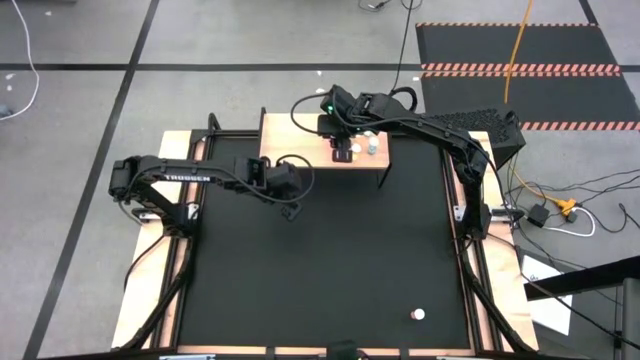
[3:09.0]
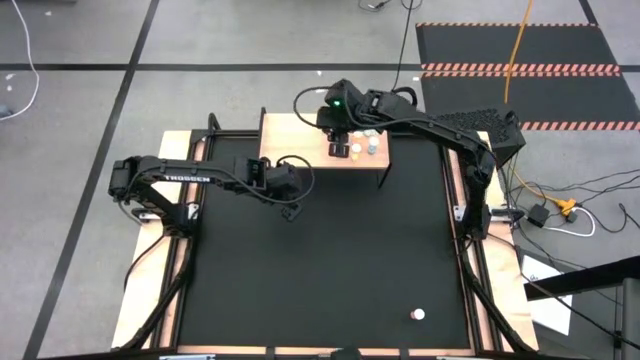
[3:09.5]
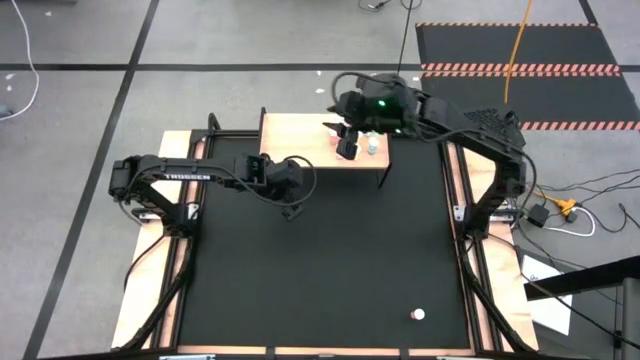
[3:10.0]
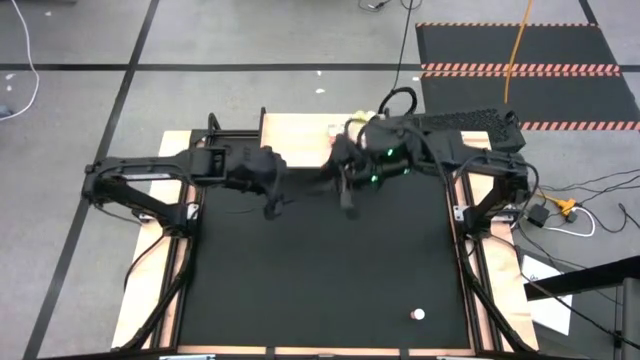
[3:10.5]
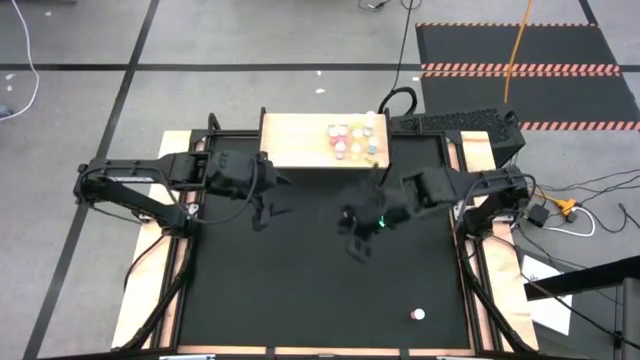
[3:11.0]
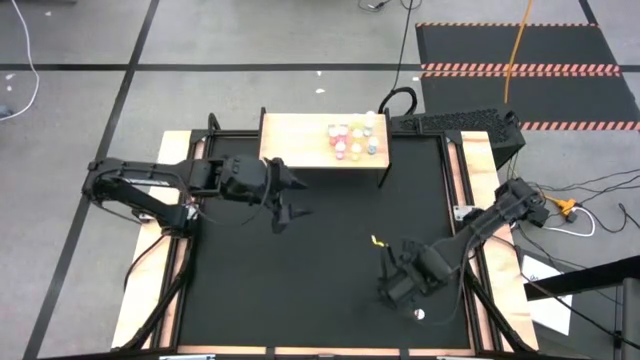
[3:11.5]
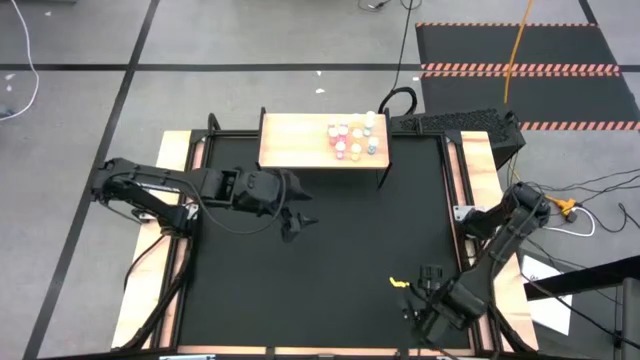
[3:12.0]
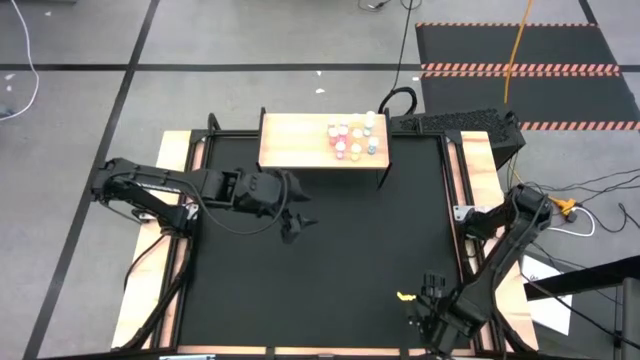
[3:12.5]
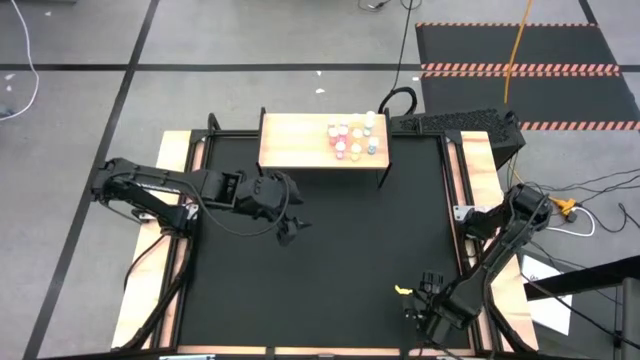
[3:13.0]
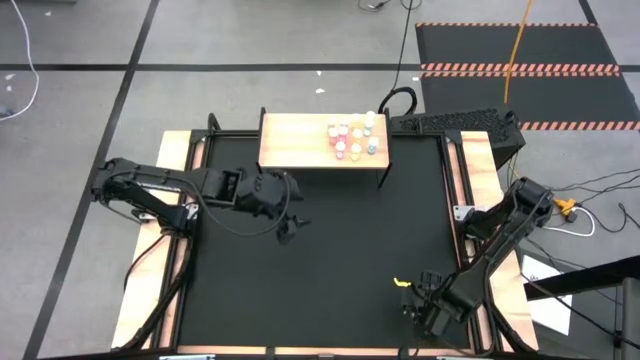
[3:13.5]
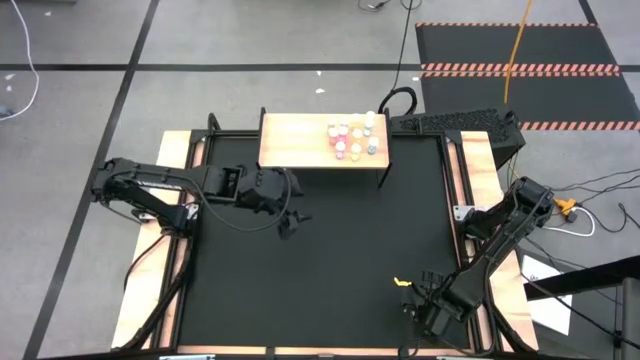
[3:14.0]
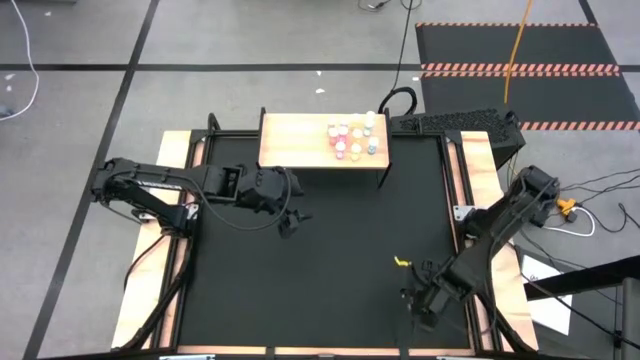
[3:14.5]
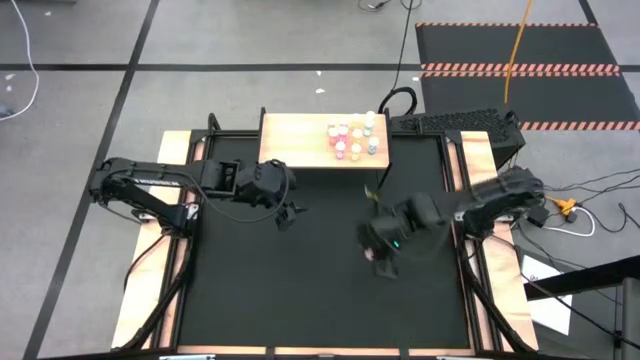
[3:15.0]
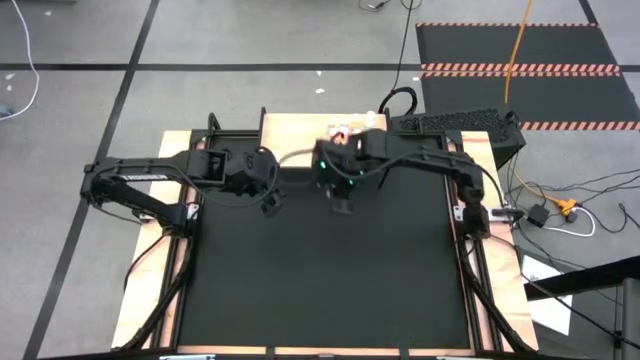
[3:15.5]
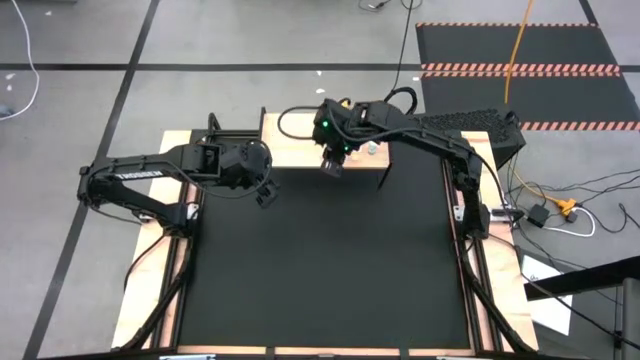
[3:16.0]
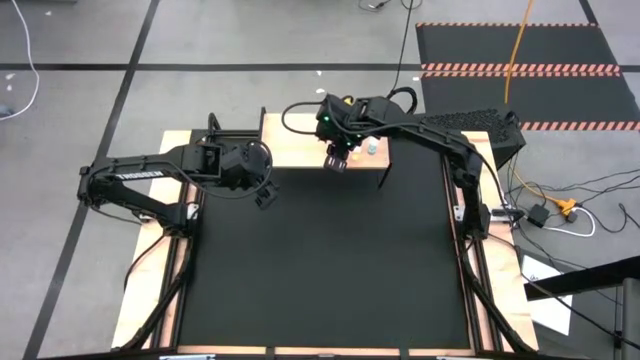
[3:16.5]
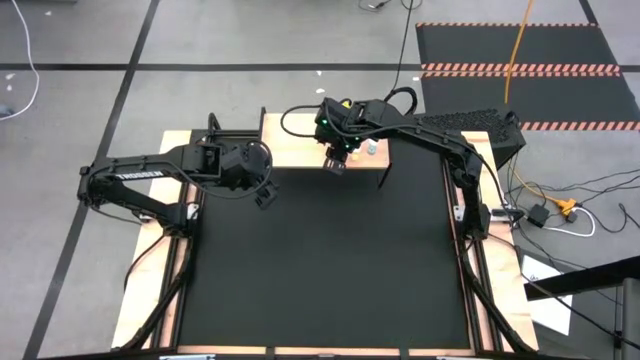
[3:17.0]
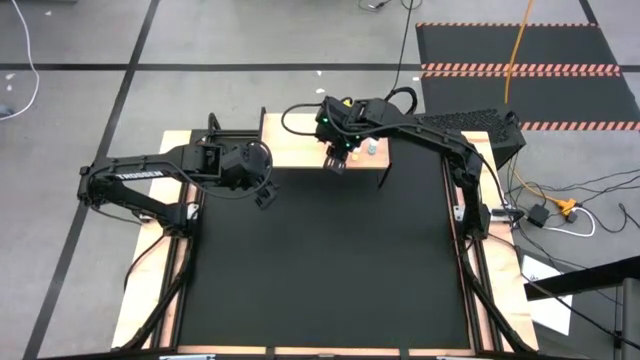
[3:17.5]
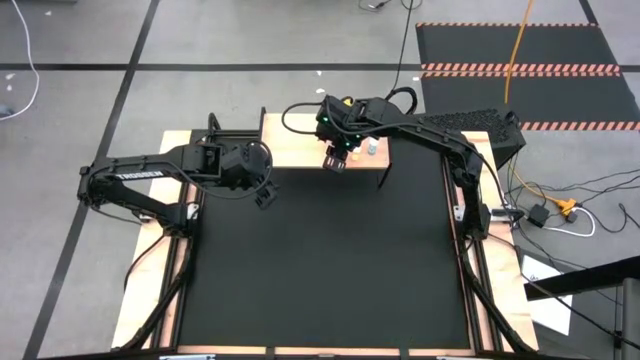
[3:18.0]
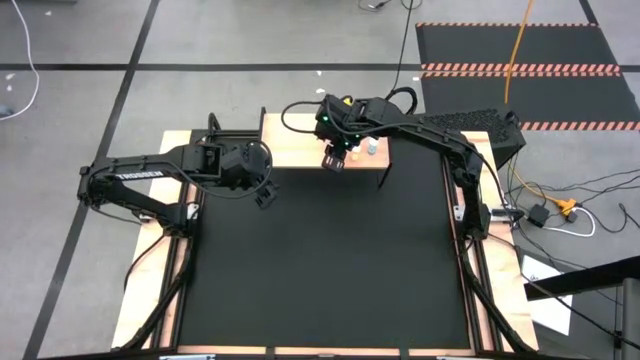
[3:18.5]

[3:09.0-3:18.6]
Task: Pick and place medicine bottles onto shelf by color
Put the orange pill bottle on the shelf aligned with the other orange pill bottles

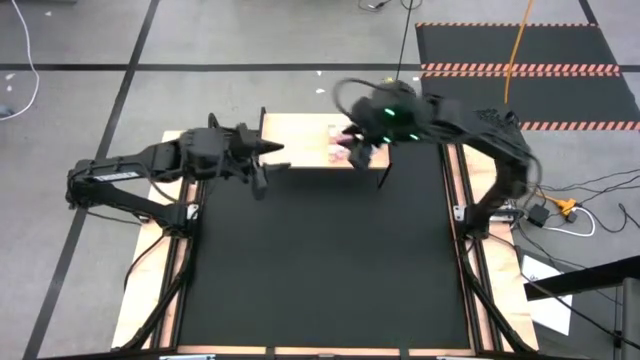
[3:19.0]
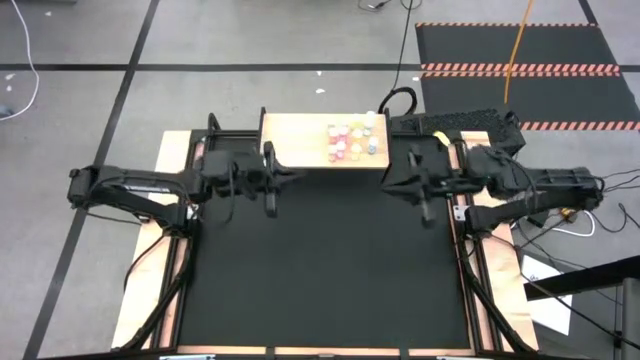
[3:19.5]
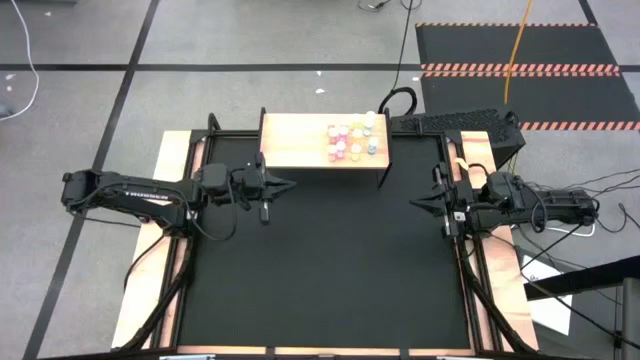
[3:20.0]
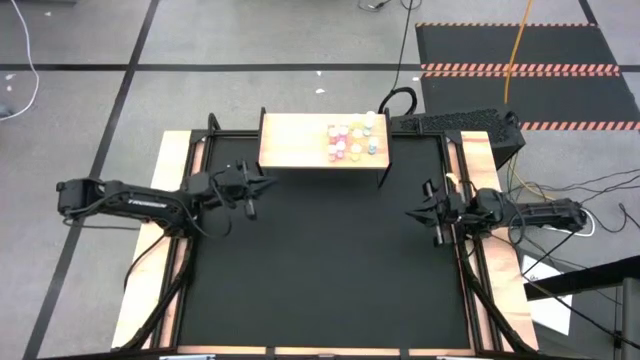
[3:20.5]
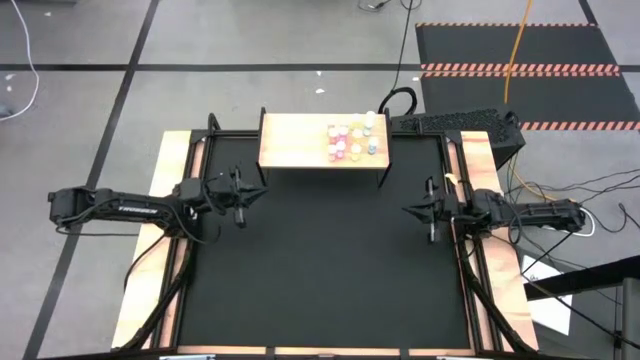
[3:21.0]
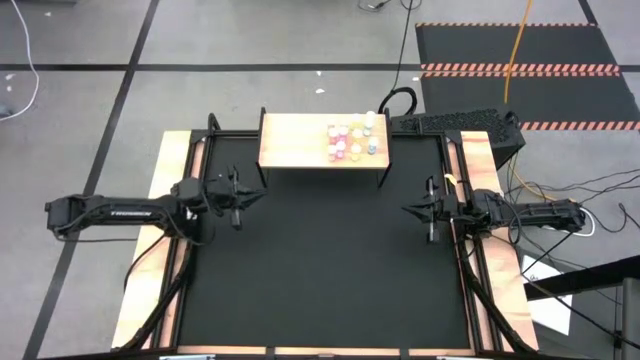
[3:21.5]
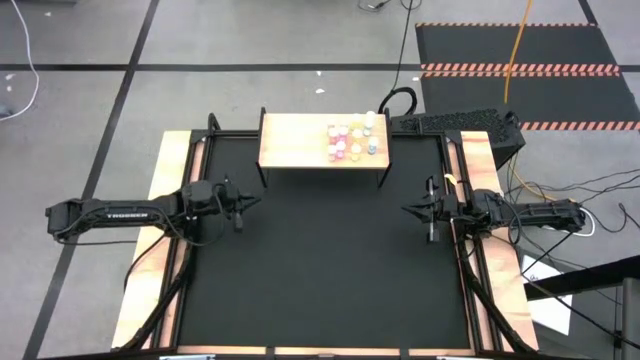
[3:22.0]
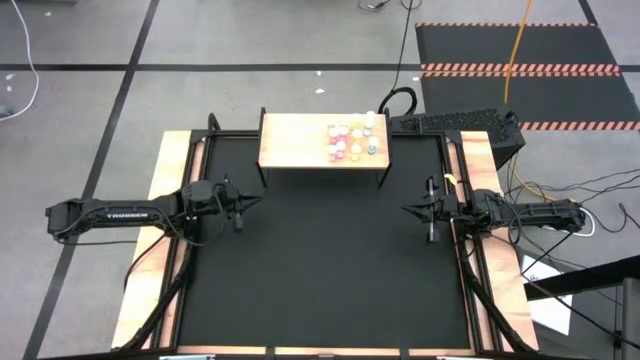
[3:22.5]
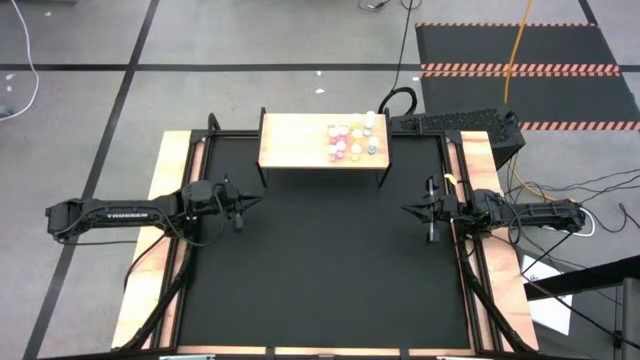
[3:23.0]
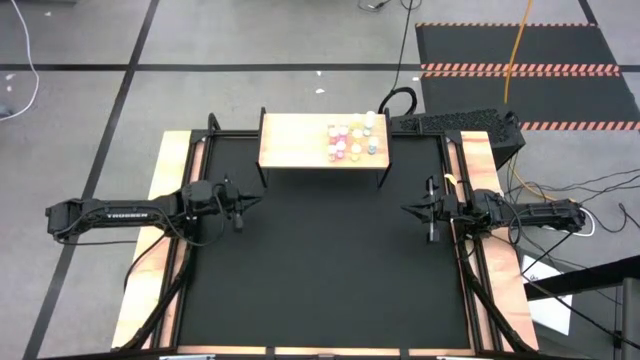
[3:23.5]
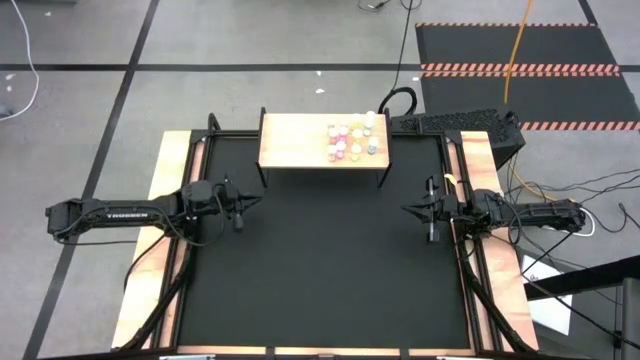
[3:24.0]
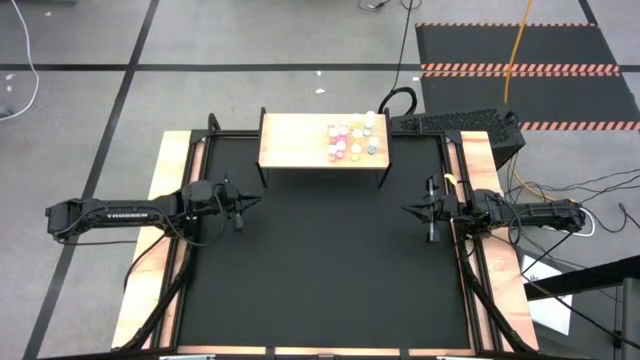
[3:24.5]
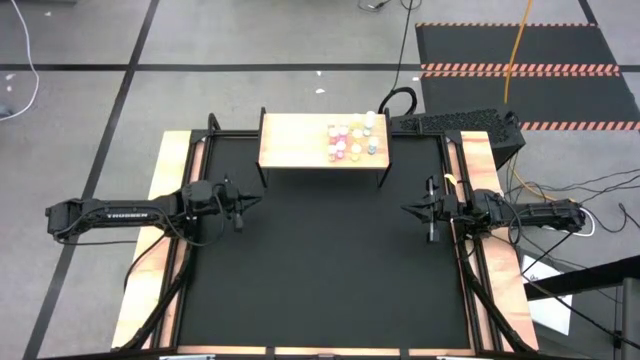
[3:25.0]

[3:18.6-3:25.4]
Return to Home Position

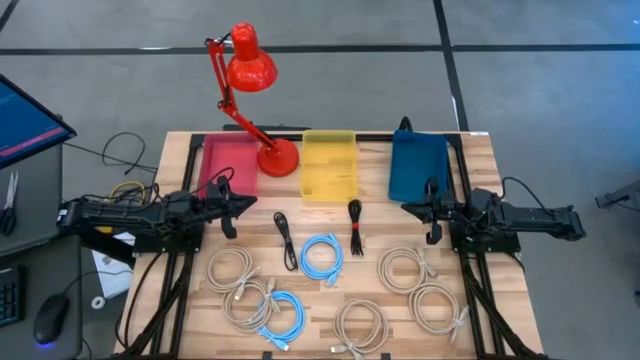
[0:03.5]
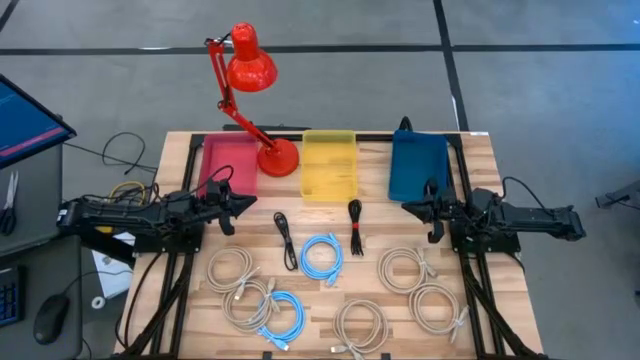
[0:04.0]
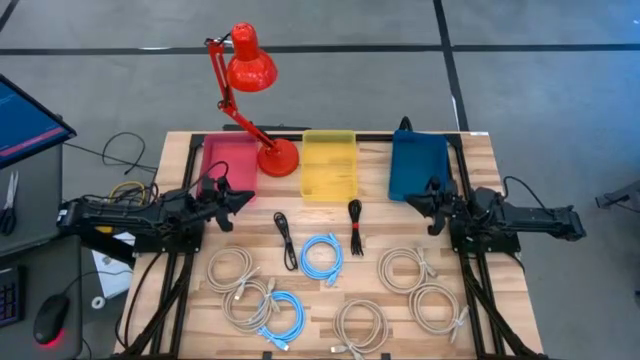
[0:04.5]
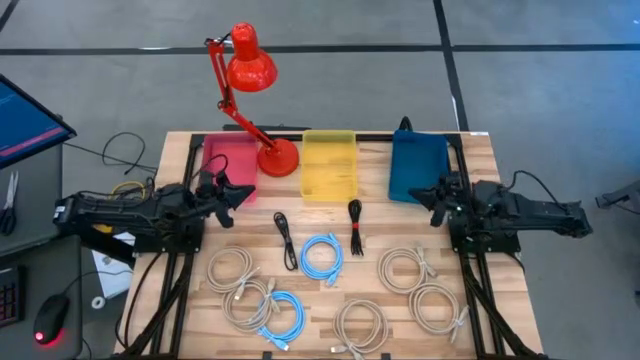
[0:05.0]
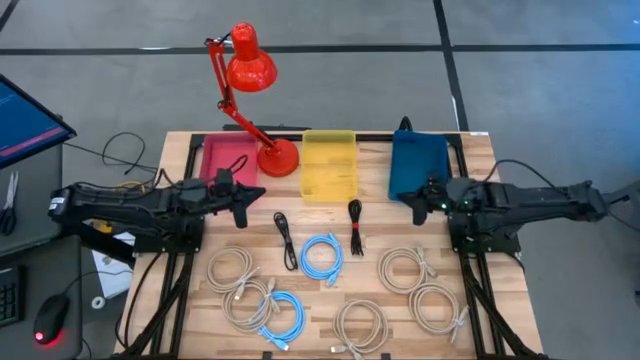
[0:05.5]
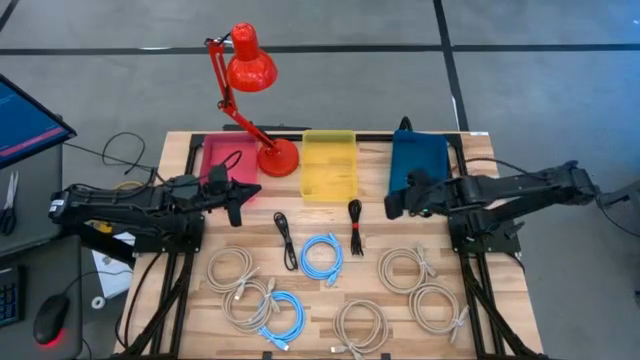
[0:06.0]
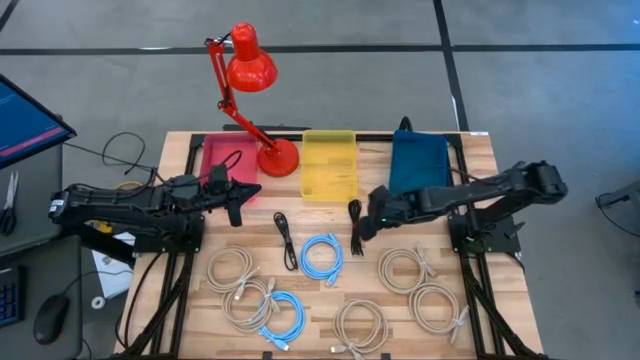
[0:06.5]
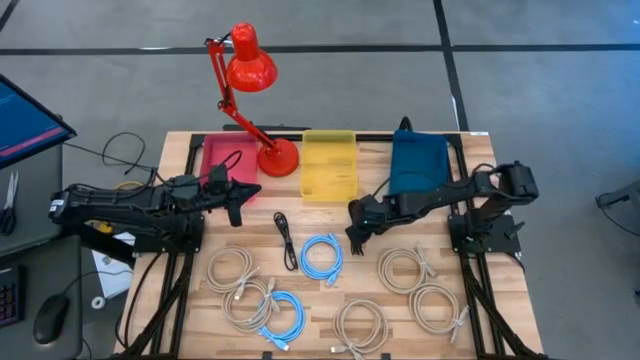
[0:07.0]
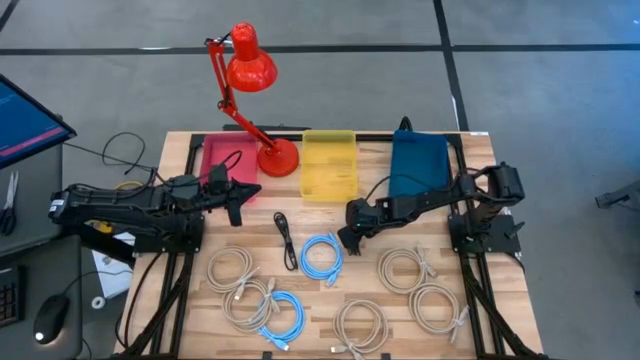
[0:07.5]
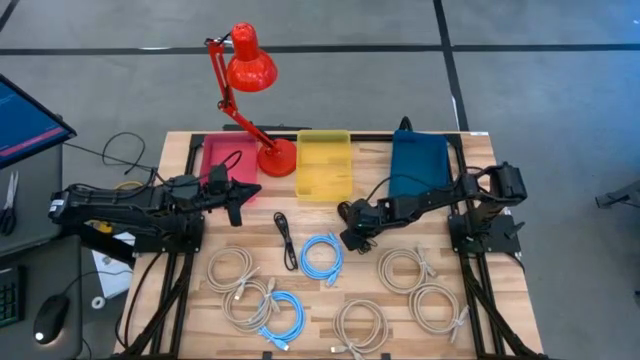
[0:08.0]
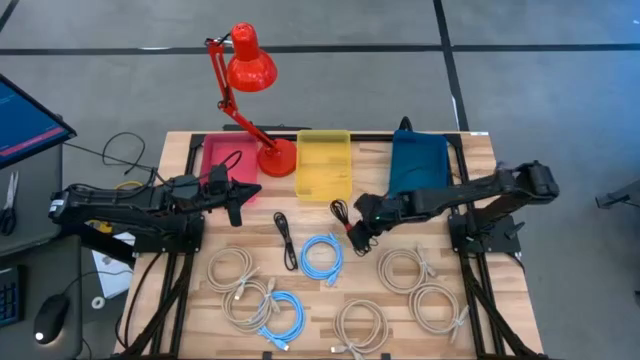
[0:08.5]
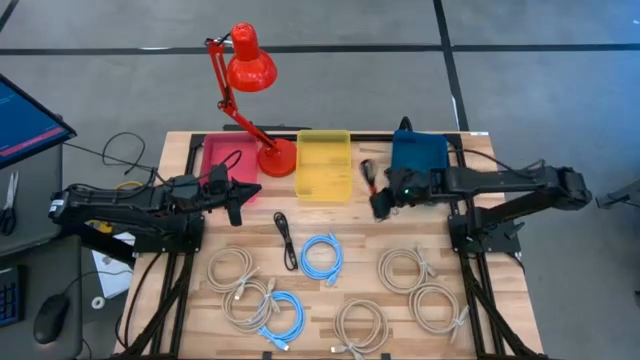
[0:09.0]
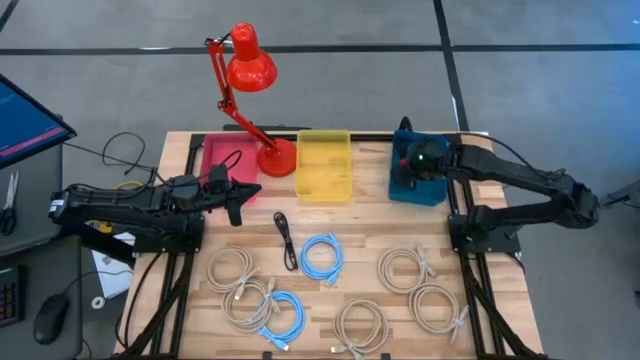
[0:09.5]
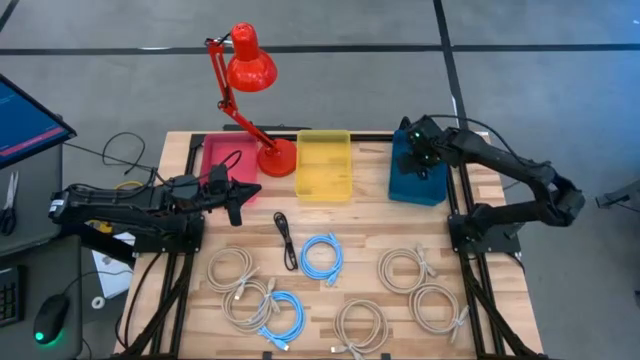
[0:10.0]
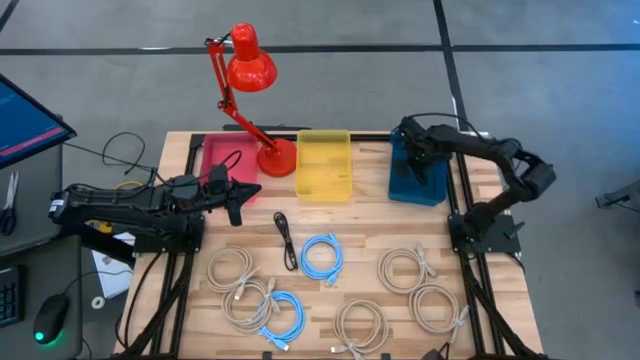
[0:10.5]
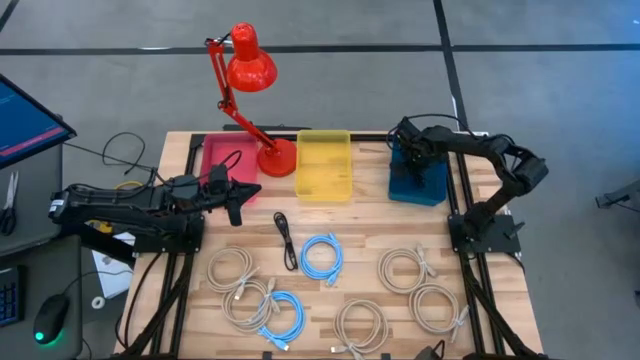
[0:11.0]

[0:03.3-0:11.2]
Task: Sort HDMI cables
Put the black HDMI cable into the blue bin
